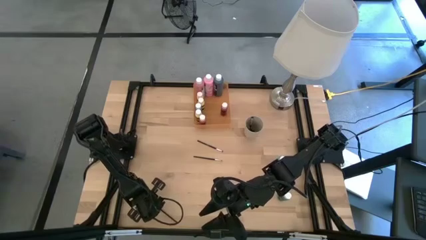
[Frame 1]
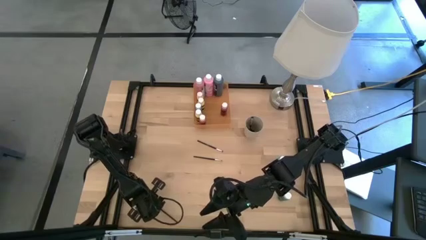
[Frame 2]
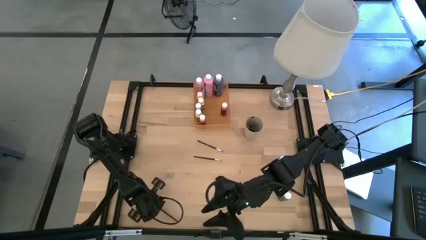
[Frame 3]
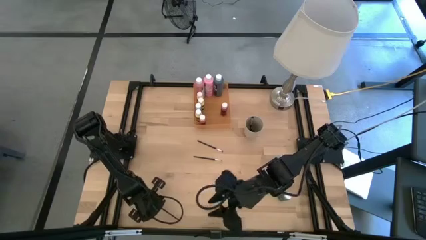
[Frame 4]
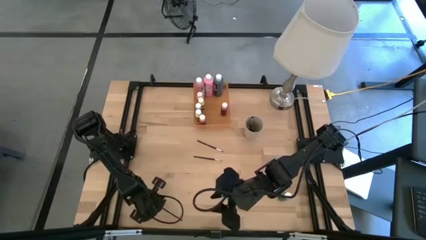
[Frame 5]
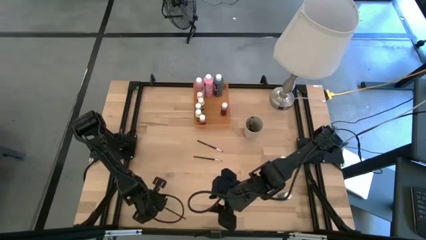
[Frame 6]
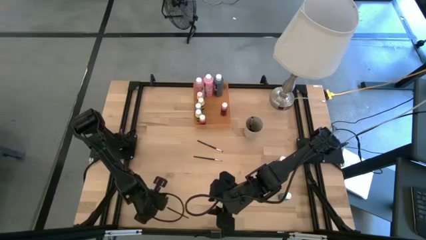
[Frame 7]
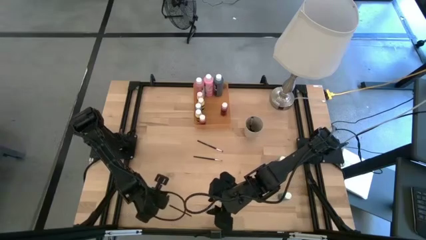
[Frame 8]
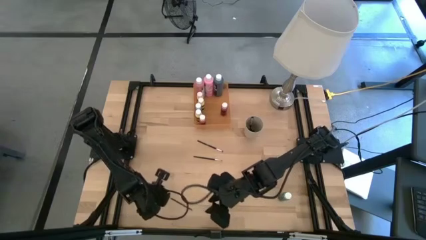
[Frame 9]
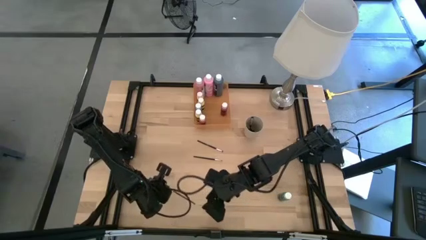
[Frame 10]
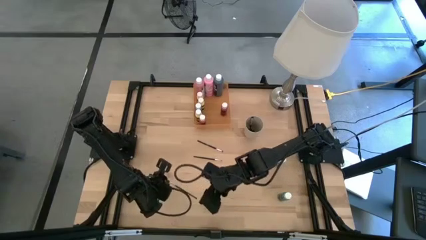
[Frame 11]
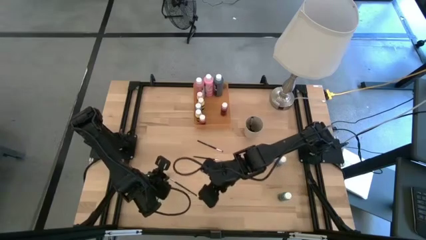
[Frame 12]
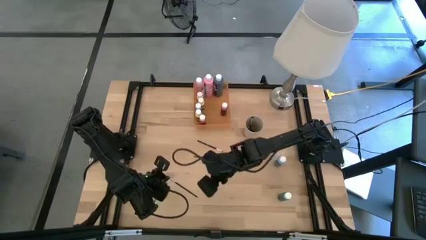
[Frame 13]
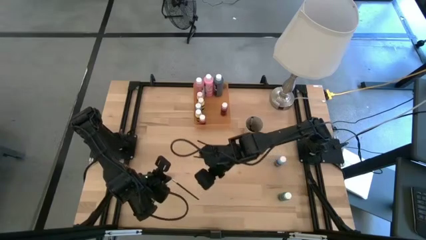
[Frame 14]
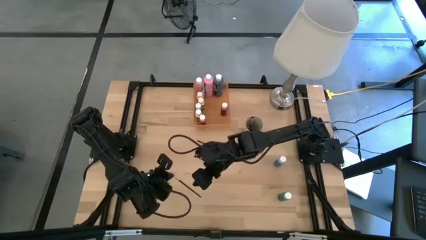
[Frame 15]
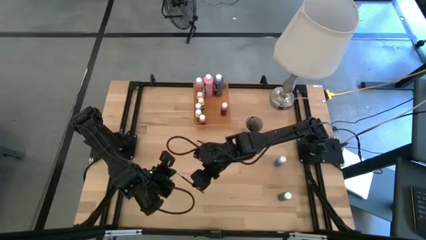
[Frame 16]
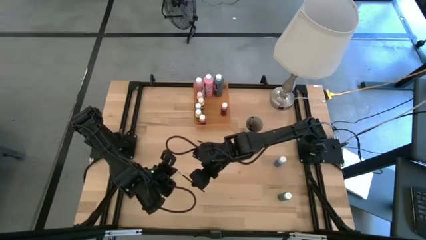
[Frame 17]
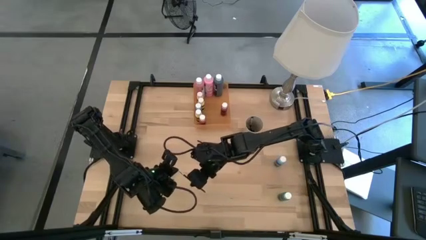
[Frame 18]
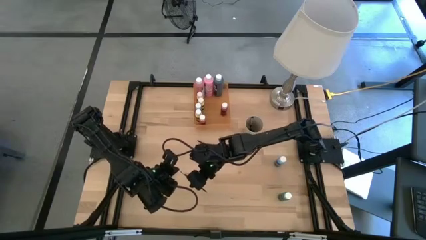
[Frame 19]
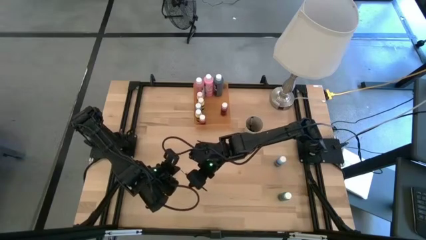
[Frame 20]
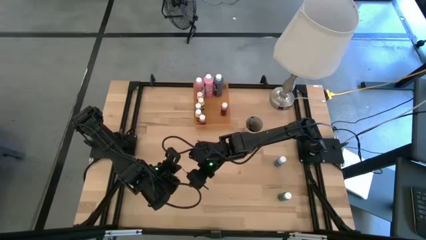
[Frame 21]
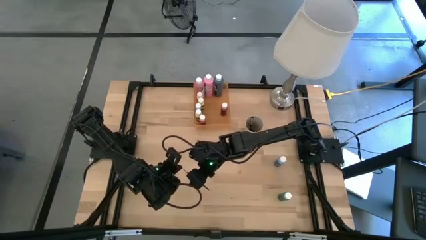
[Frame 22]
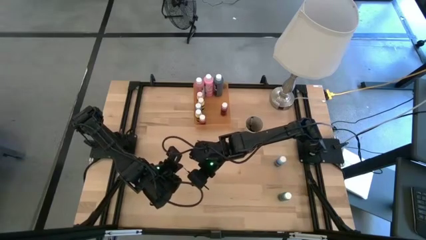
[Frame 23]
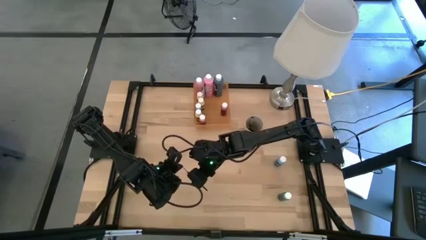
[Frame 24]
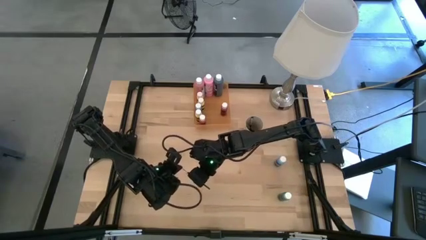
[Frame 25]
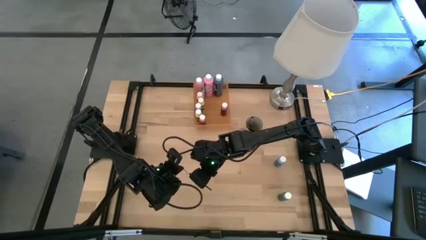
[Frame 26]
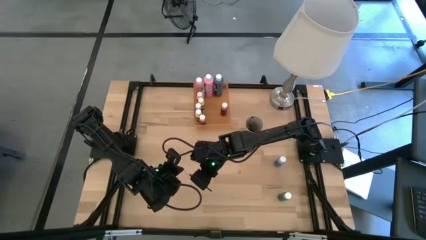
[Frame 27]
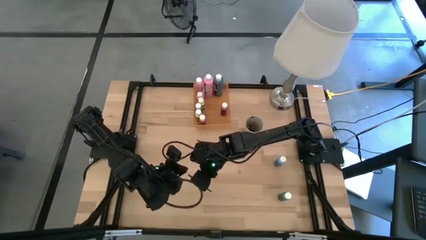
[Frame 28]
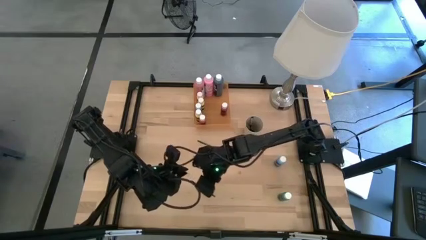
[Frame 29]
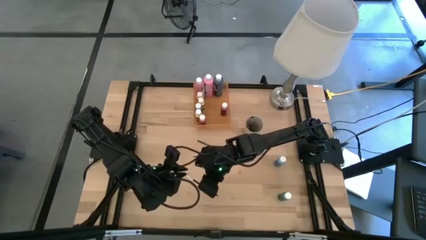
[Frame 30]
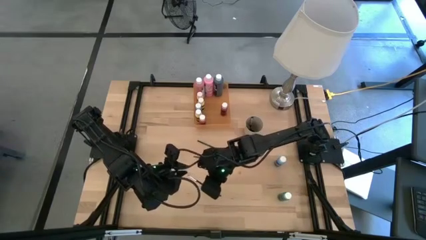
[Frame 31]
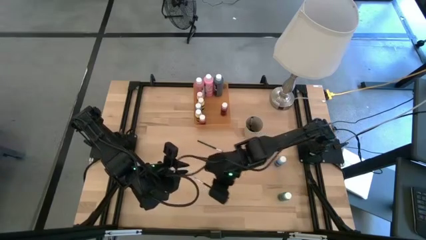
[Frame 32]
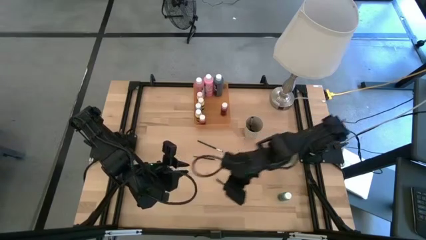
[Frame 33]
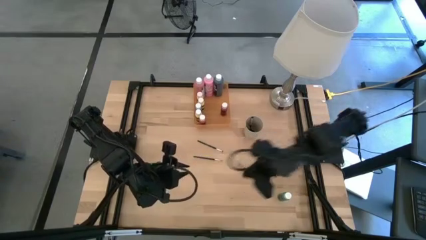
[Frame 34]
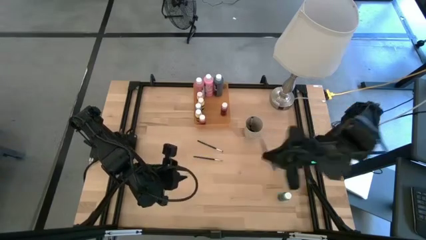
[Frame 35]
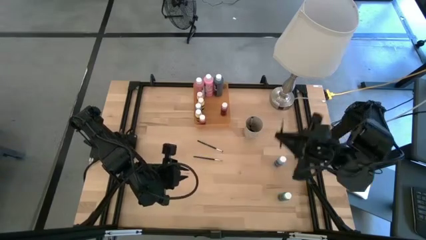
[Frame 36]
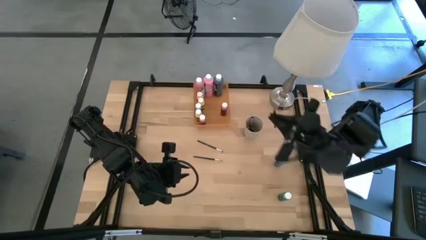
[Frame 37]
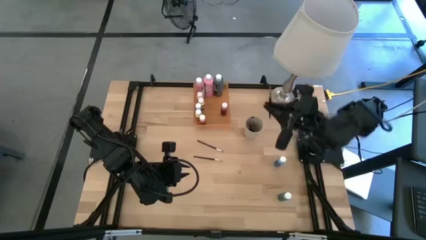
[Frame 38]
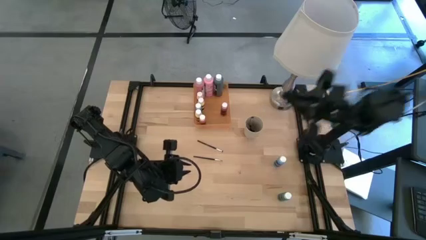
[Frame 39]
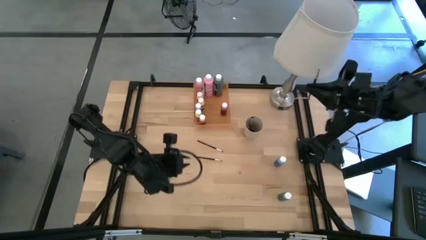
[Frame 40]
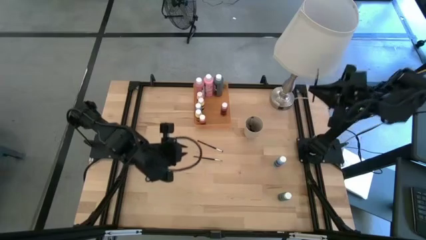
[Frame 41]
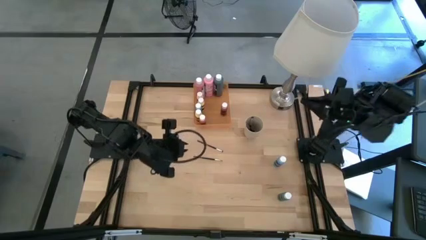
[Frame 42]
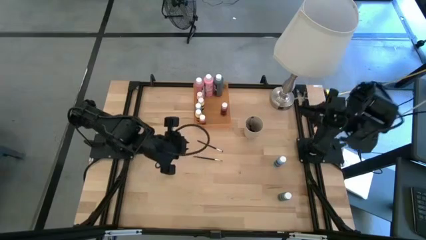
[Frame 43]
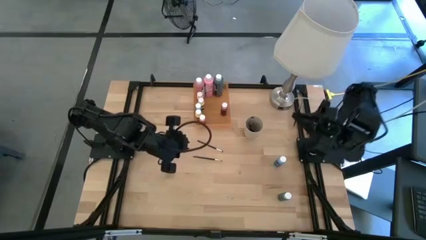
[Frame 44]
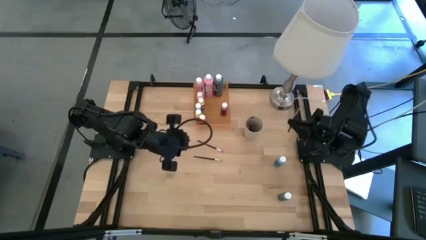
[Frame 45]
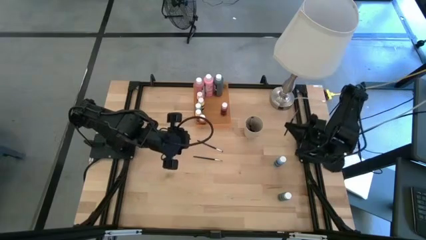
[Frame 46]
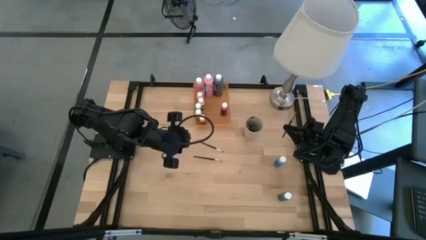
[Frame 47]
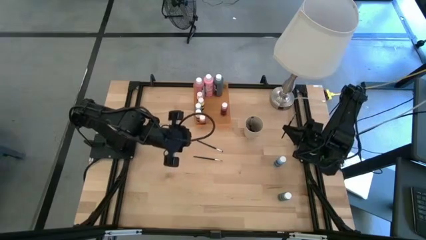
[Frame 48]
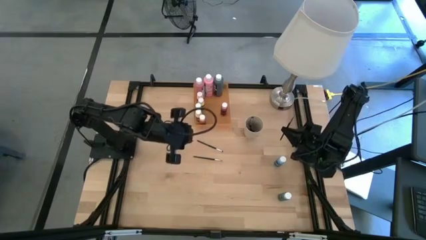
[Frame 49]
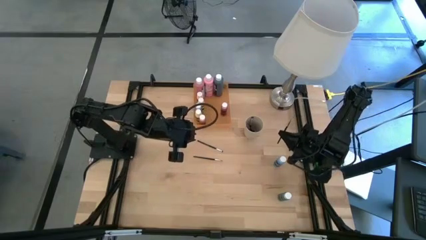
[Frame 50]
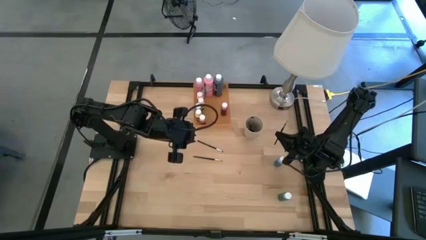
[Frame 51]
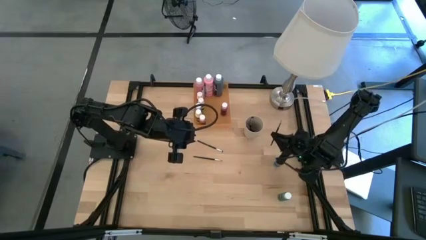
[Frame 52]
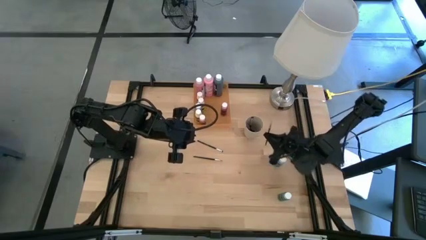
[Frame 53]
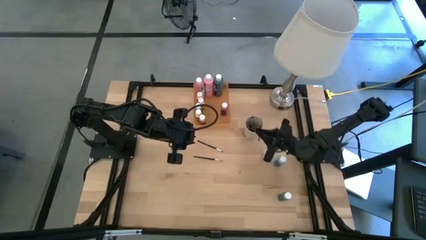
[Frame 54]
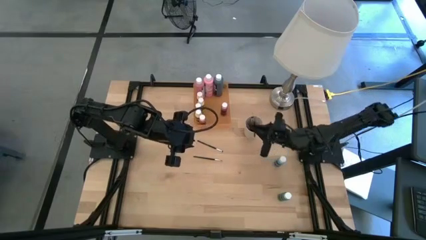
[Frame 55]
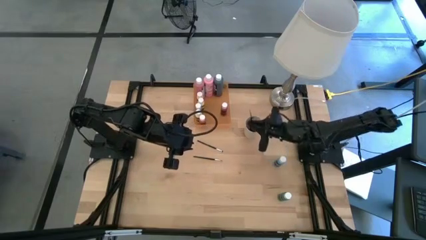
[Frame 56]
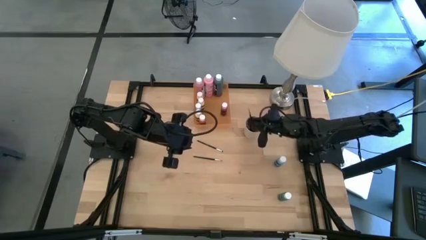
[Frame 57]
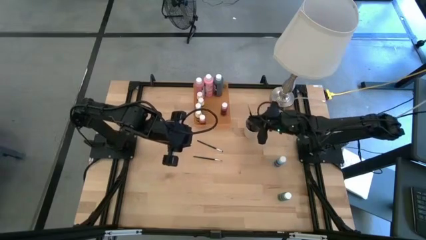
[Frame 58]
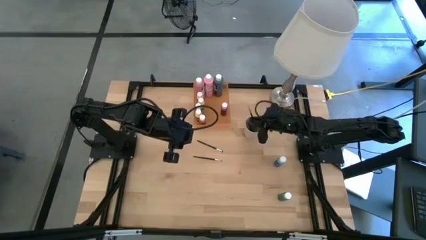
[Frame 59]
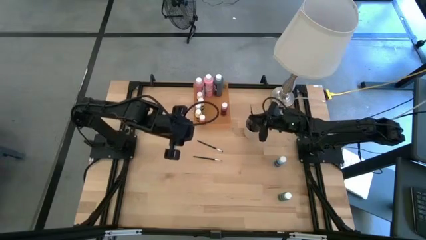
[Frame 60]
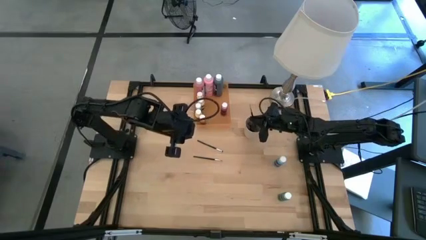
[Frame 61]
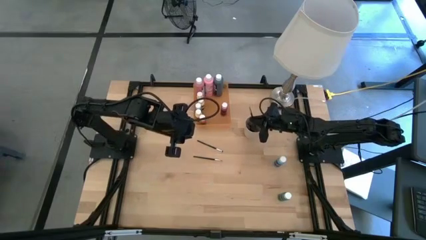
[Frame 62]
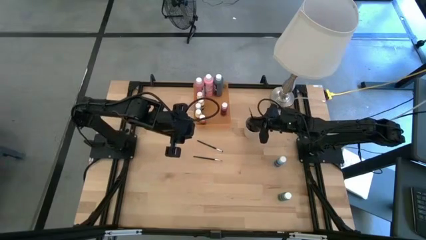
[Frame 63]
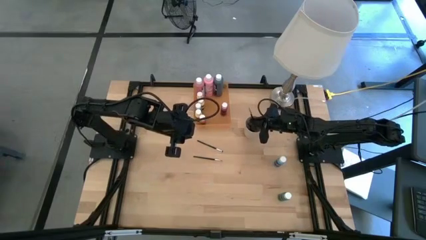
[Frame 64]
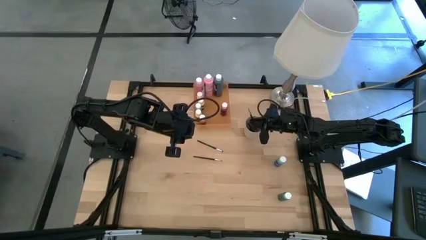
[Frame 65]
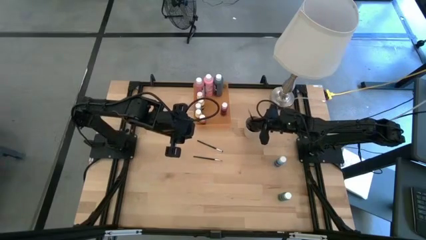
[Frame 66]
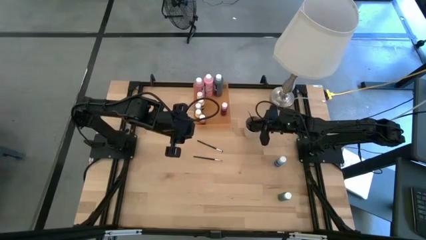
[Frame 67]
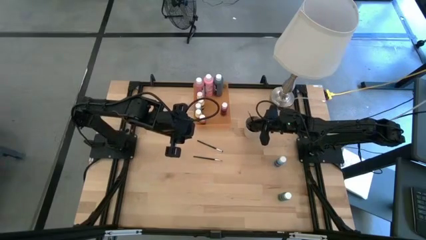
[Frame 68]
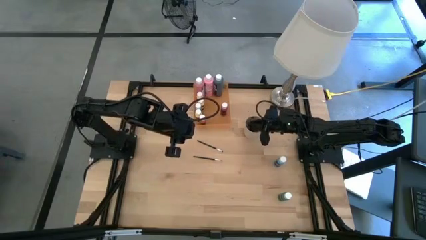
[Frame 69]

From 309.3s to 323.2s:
Task: Pick & Place Paint Supplies
Put the black paint brush into the light brown cup

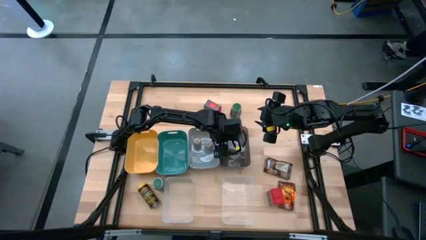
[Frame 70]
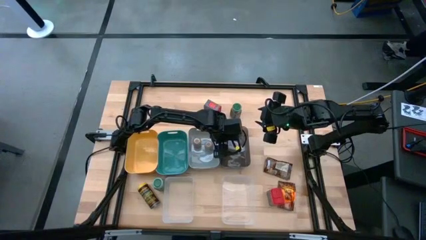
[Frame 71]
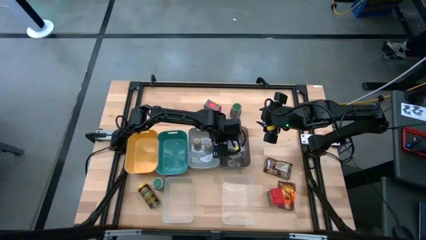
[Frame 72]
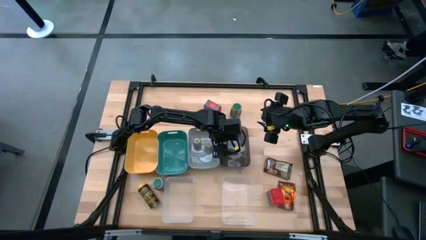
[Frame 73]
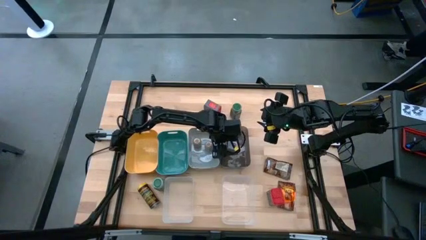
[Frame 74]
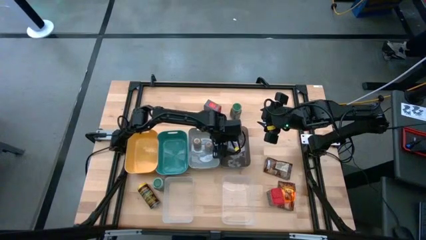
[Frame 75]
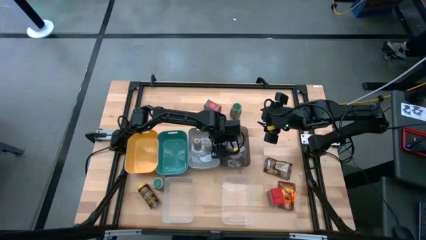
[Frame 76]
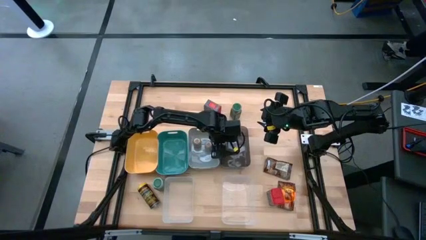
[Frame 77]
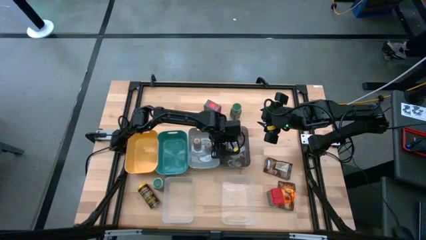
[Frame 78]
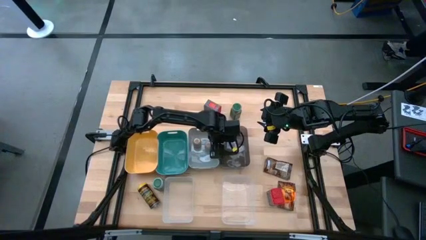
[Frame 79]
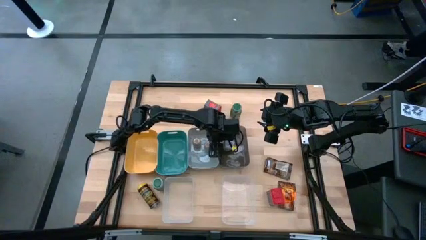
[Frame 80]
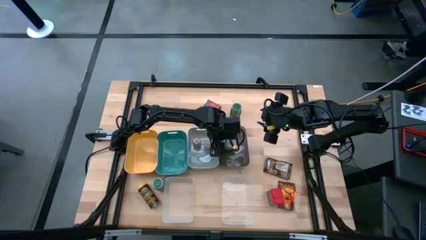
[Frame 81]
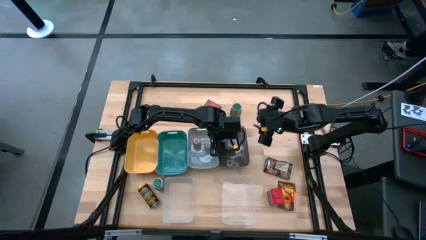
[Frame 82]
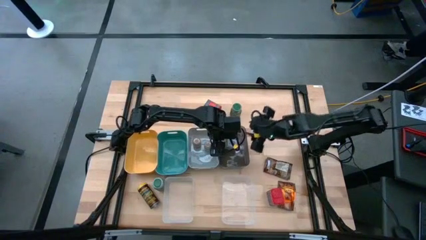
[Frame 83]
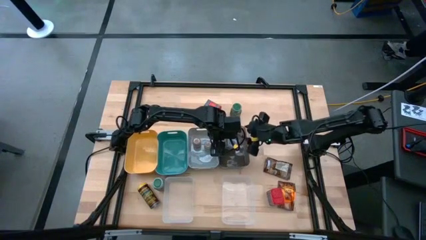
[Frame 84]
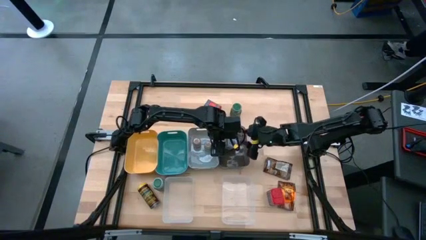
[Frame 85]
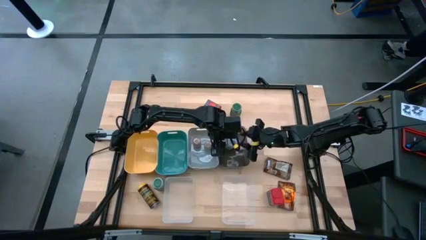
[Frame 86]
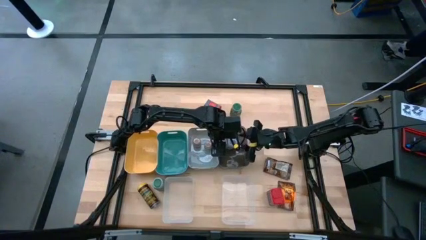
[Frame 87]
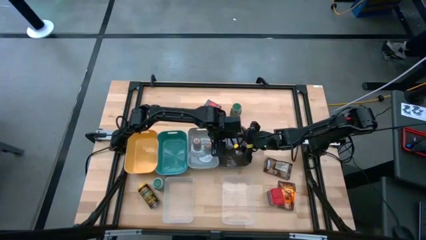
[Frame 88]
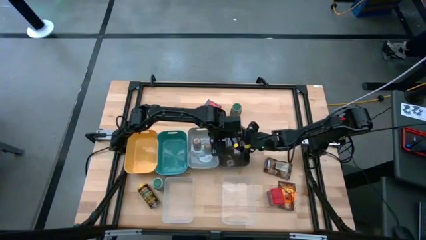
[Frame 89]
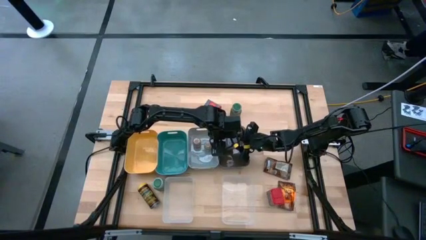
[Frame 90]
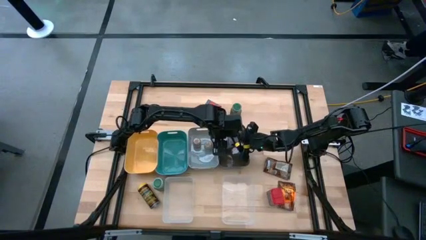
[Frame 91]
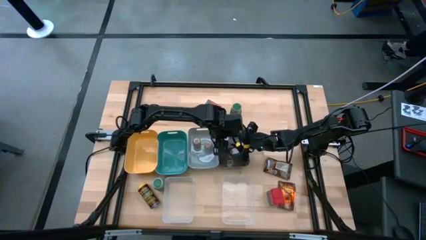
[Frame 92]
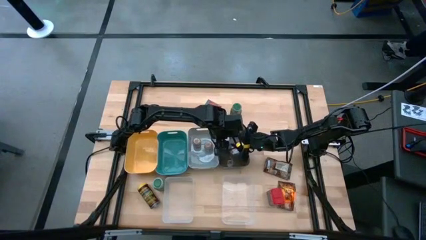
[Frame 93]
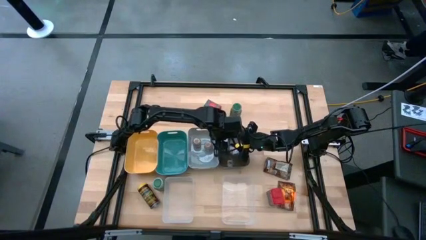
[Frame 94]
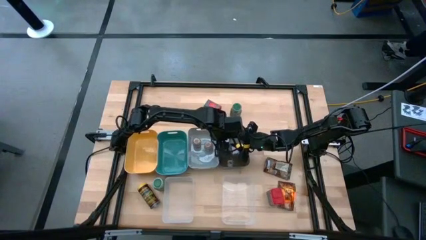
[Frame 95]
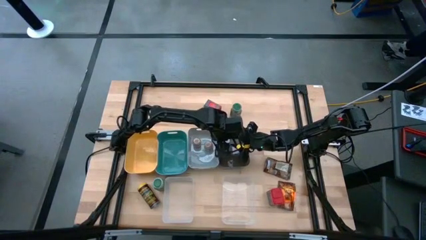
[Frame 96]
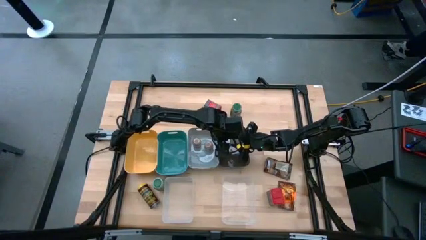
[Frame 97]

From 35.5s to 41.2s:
Task: Sort spices by type
Put the white seasoning bottle into the transparent black bin
